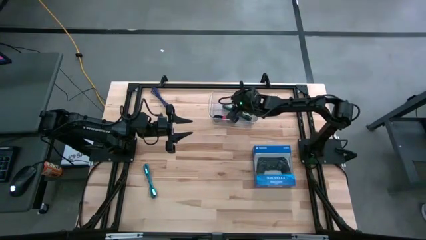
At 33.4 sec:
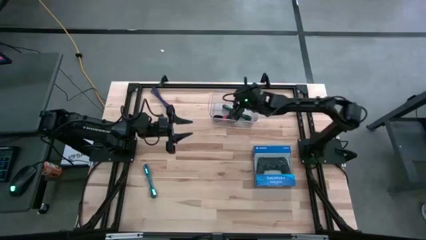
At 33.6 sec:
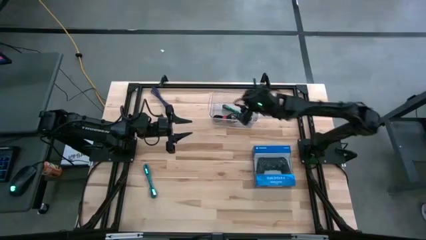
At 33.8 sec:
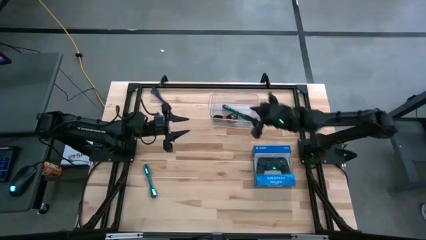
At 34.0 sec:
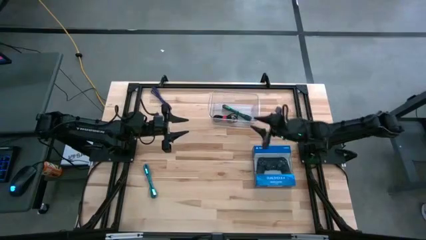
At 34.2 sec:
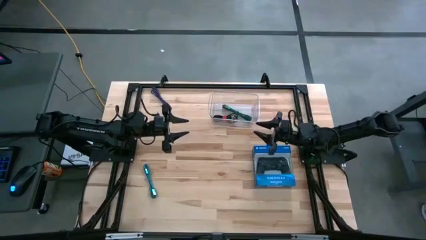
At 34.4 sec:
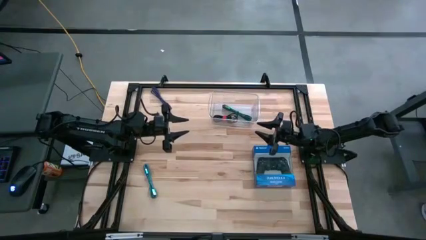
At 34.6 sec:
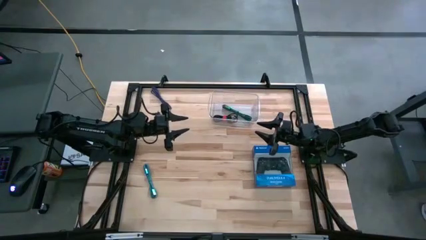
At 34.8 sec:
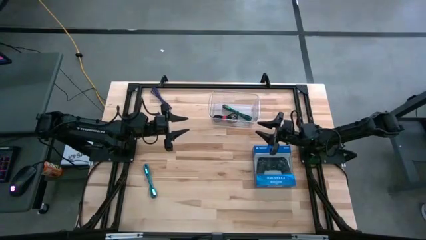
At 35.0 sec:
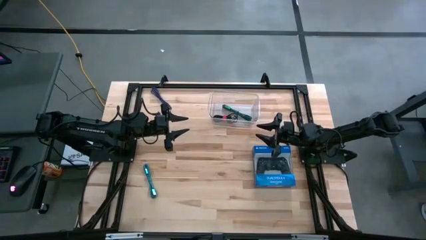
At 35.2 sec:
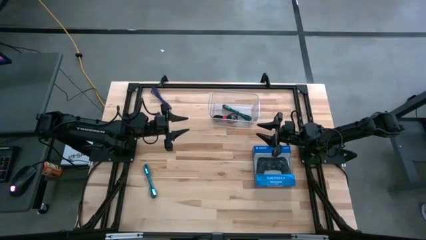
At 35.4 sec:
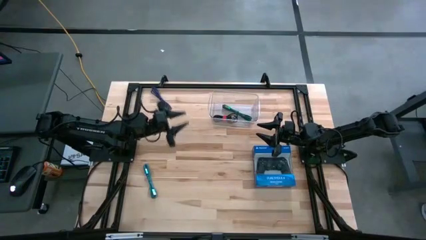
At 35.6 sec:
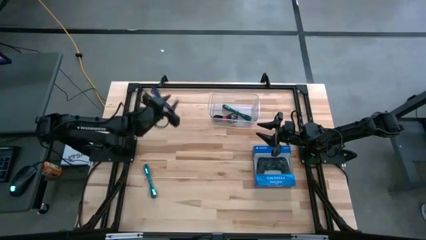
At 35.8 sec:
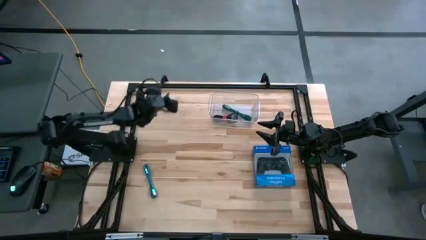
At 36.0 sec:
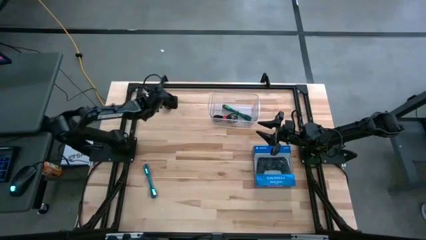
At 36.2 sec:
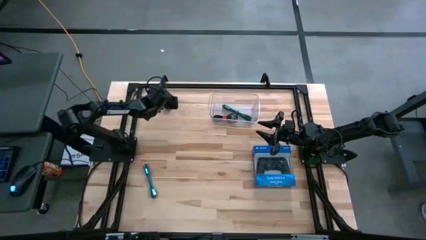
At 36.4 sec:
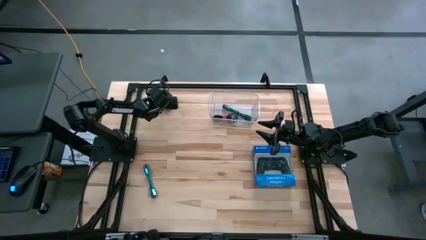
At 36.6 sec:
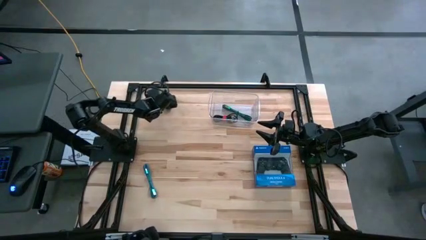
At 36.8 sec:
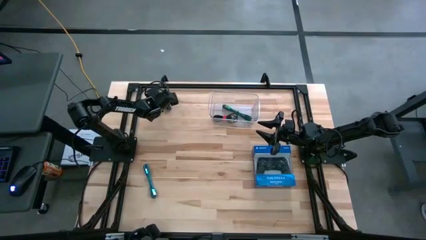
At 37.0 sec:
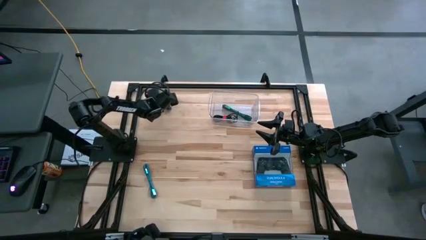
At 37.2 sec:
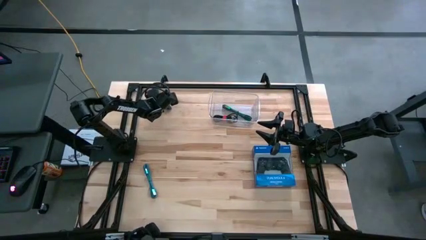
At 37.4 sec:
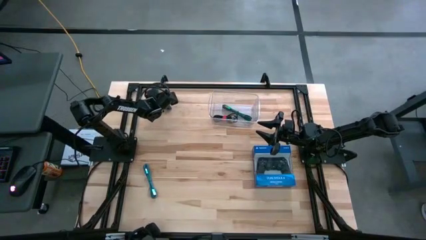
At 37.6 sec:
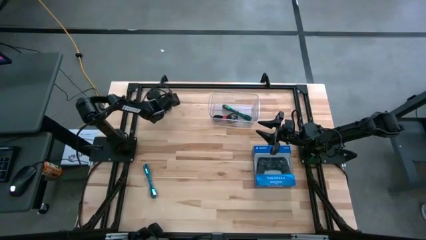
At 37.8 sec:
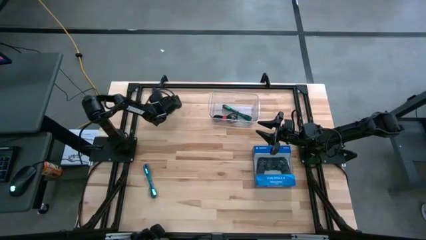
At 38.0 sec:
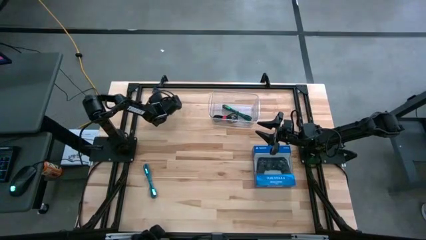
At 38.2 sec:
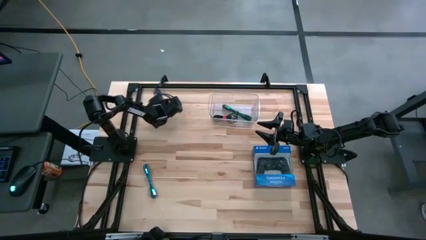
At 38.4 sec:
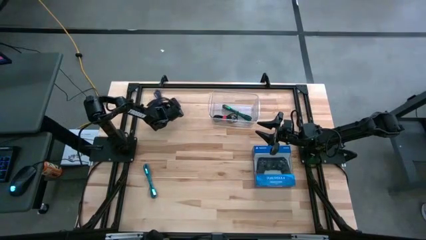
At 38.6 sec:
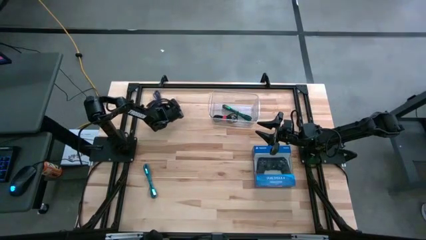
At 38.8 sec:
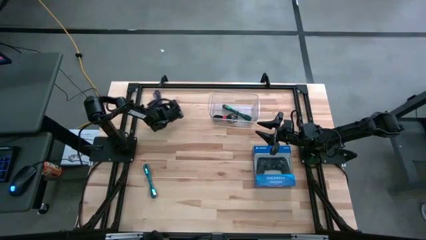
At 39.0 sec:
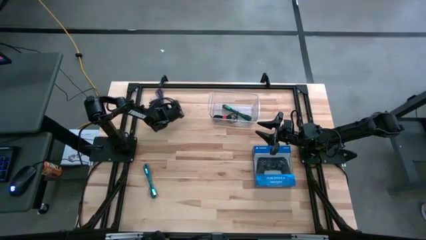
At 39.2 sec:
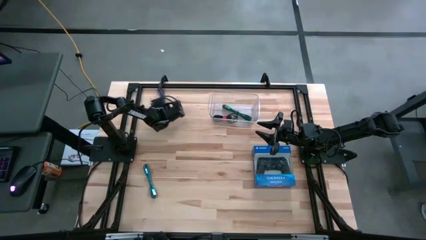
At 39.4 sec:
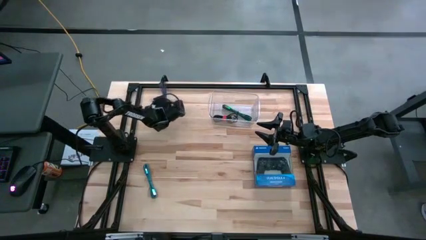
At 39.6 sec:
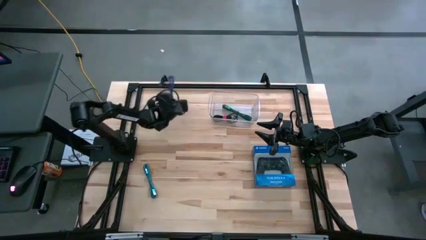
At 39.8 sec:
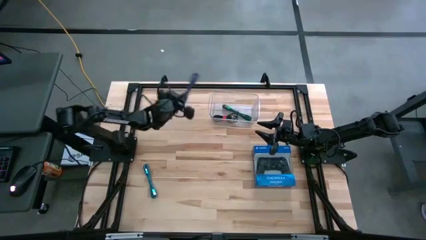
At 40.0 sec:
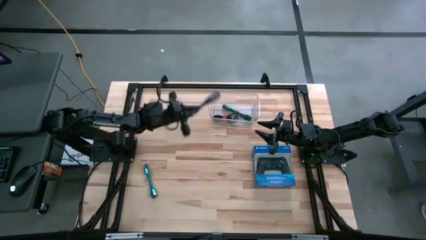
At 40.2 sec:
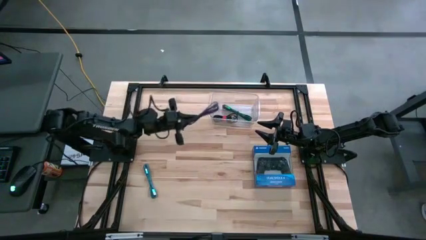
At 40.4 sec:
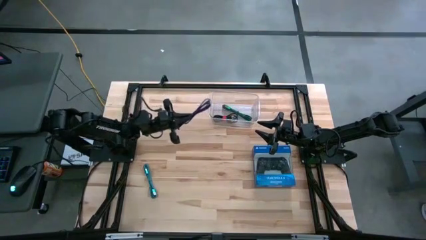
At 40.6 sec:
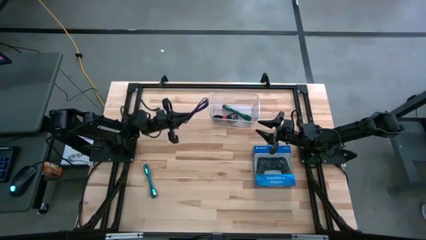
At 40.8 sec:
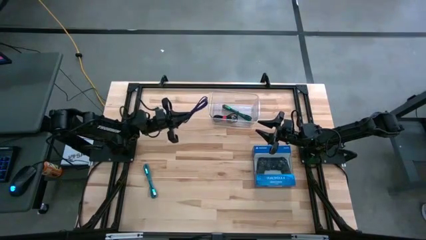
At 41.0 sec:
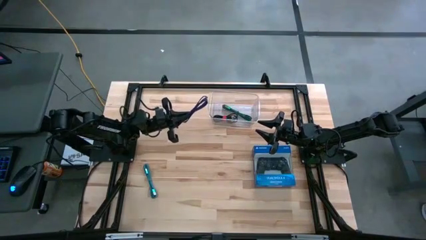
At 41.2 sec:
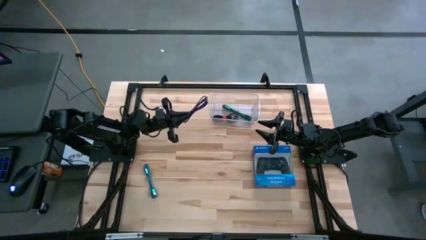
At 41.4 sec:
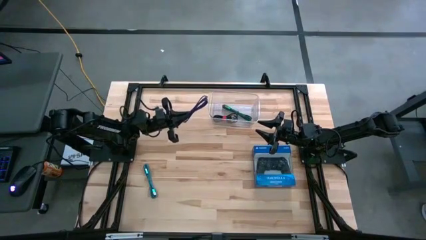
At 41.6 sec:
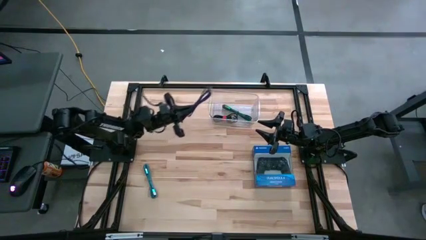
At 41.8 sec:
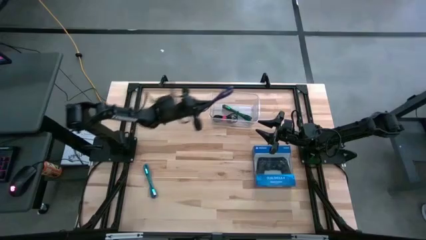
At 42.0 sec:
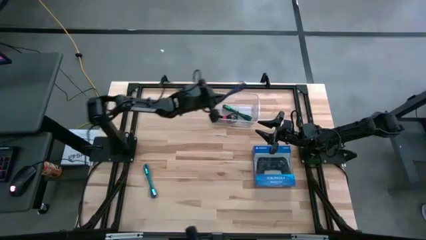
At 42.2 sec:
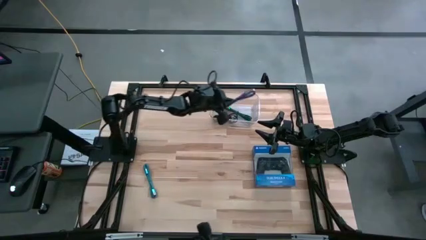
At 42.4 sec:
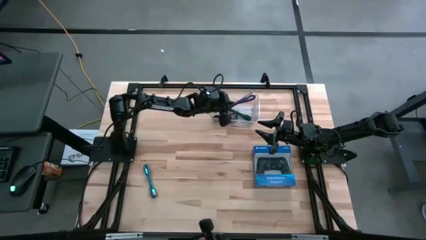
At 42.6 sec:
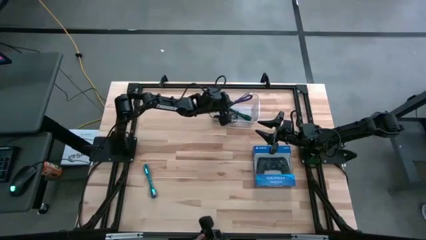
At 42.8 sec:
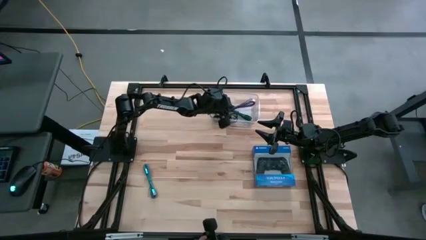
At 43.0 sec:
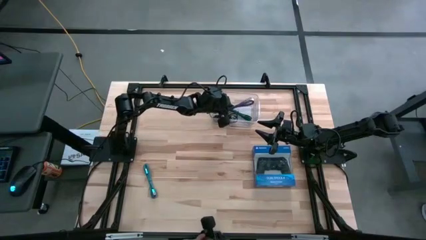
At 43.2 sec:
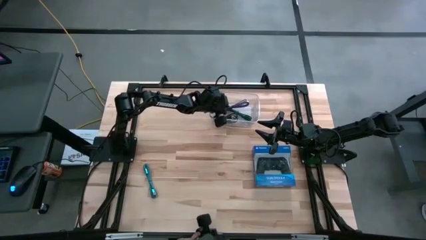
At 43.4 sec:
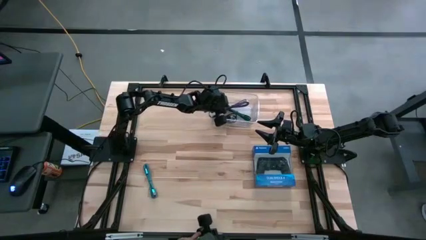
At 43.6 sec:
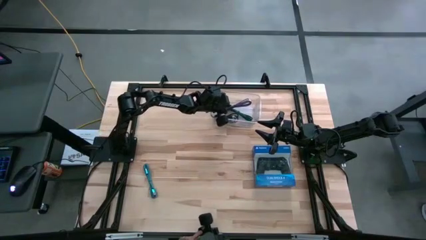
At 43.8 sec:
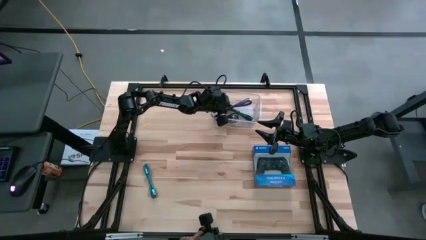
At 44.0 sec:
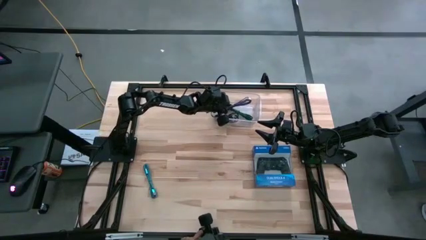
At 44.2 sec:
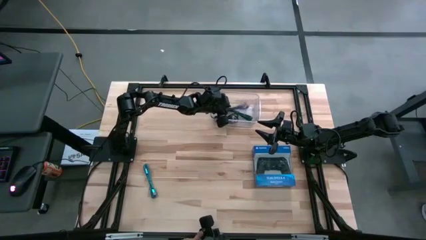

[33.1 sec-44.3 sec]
Task: Pick and place USB-C Cables
Put the violet charger cable into the bin

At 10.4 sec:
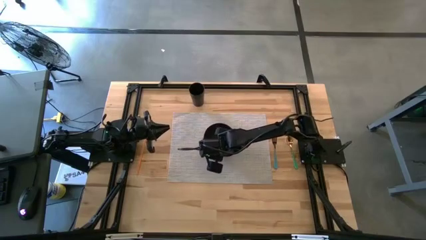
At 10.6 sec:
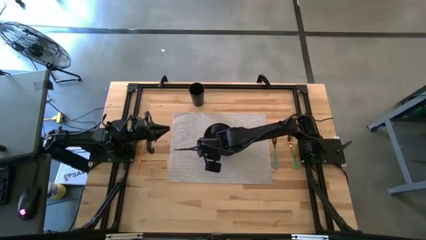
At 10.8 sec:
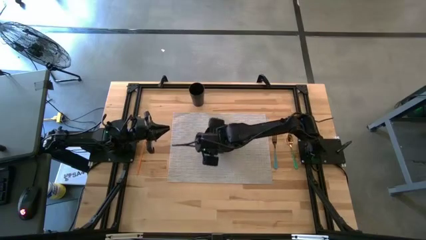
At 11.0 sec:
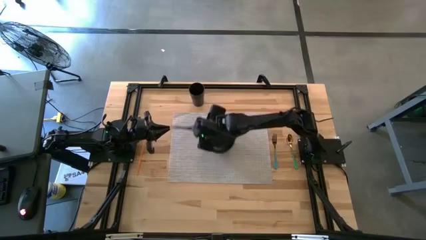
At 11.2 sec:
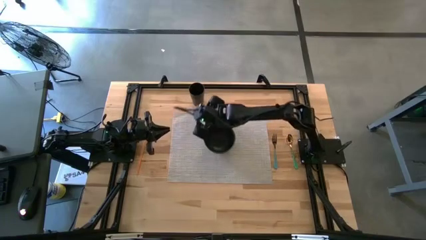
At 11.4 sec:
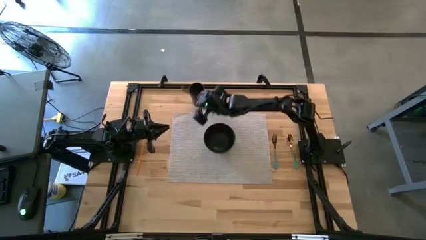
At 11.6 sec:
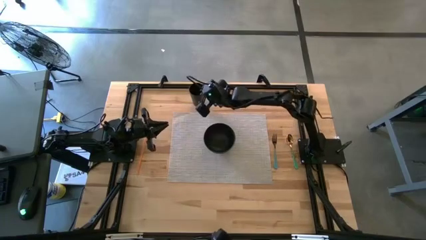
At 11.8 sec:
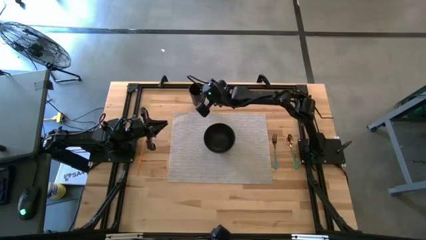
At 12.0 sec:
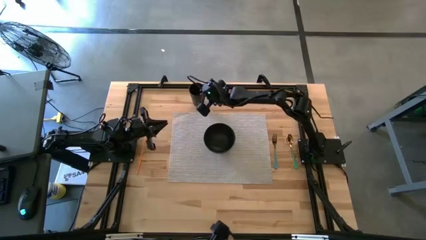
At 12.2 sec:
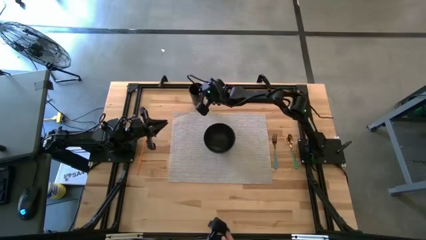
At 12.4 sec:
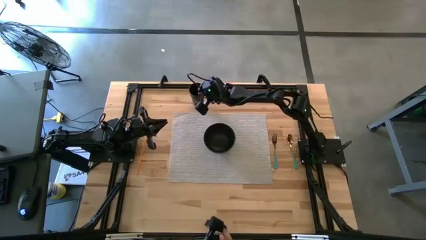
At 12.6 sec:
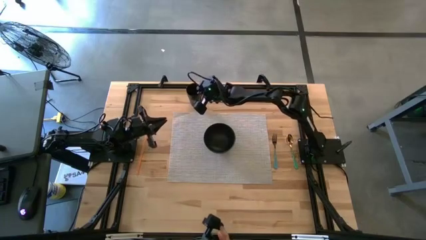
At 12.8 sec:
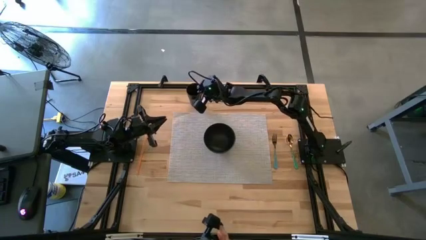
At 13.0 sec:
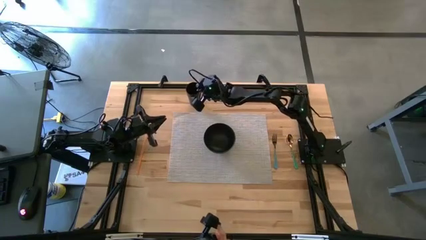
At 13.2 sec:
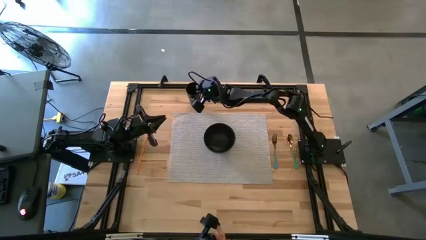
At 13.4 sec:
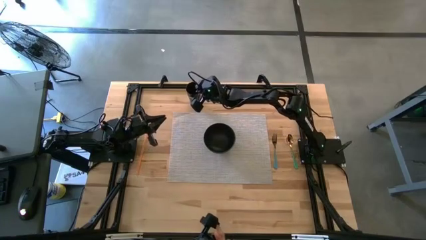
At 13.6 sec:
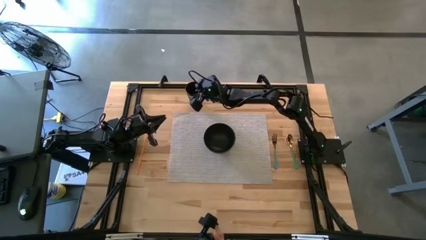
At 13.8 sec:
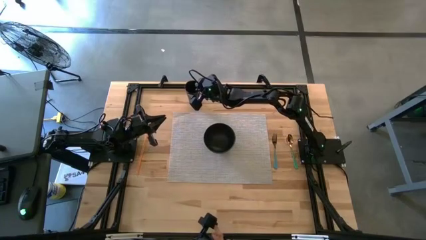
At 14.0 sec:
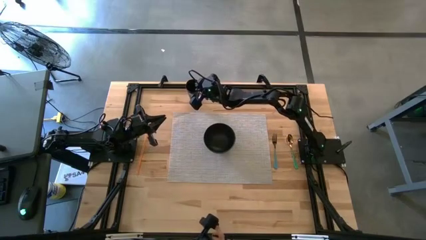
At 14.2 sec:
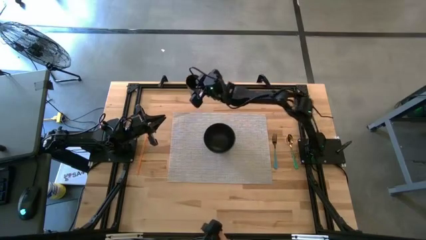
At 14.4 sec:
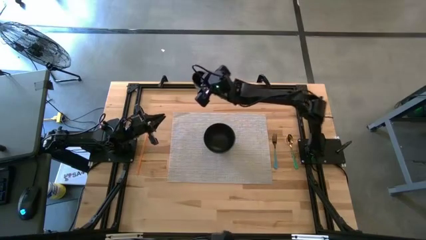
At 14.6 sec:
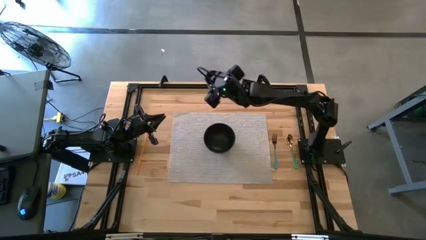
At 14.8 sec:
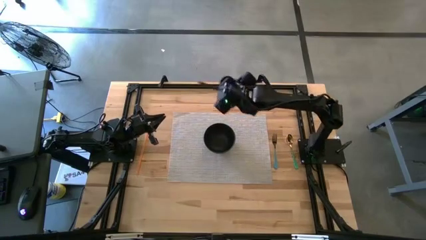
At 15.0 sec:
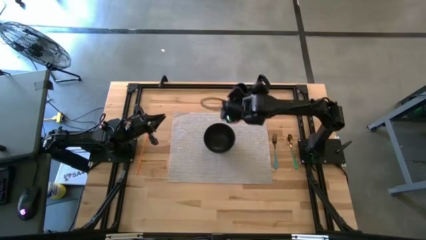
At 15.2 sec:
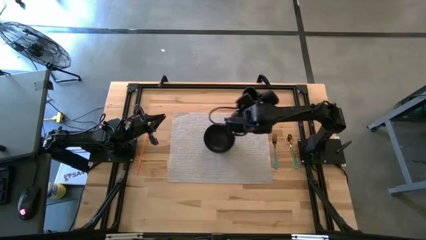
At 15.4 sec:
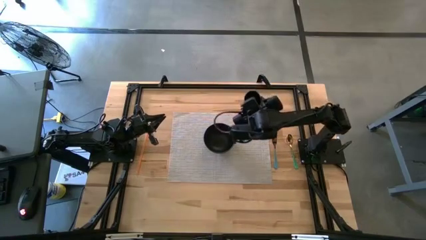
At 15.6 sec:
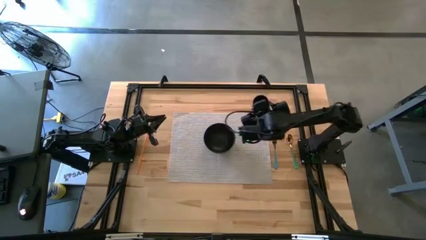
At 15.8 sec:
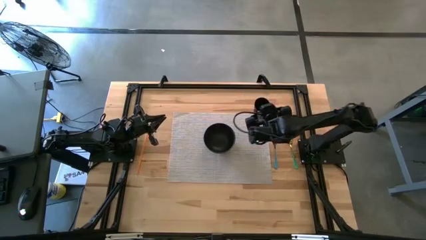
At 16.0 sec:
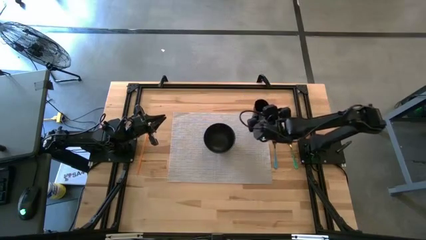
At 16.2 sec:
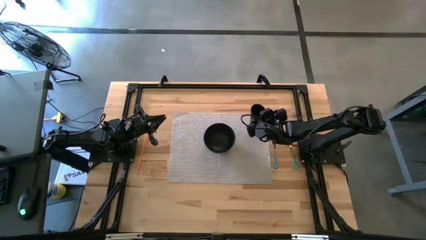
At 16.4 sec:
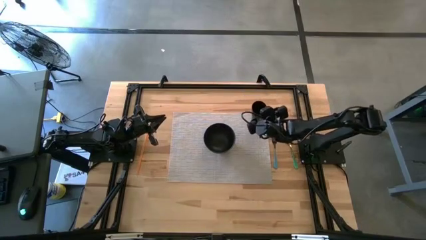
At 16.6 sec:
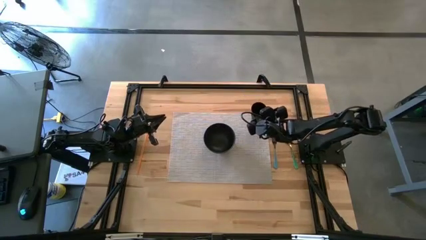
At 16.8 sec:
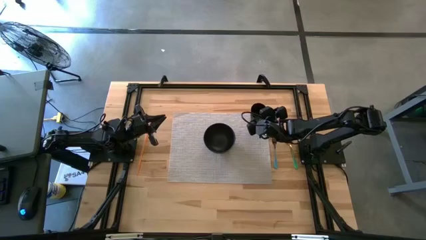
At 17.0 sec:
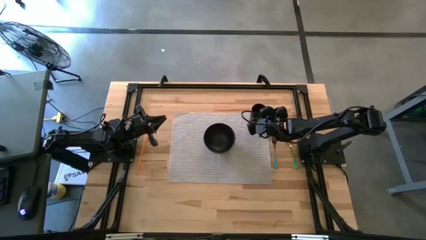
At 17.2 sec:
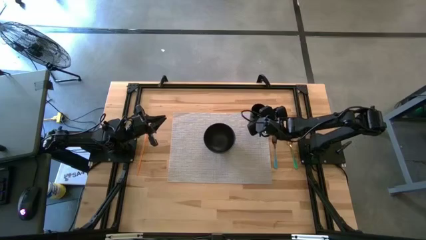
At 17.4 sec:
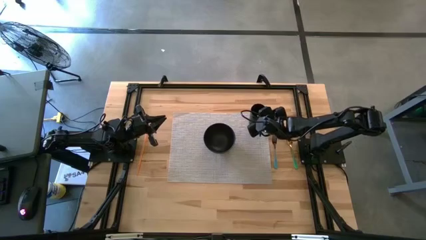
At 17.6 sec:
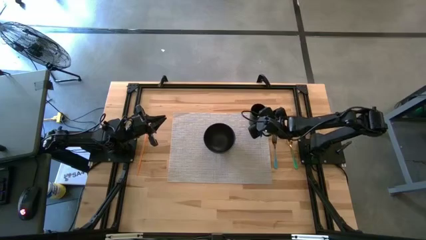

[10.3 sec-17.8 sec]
Task: Pick & Place Utensil
Put the black cup on the gray mat to the top right of the black bowl
